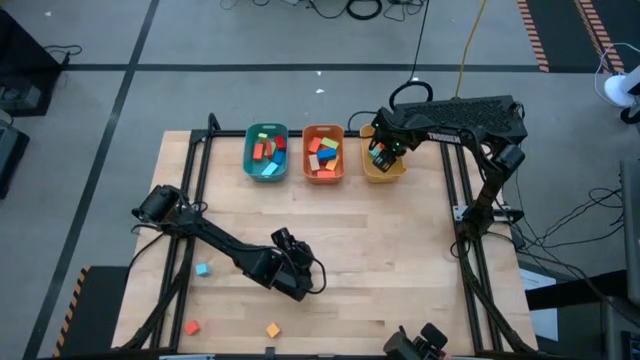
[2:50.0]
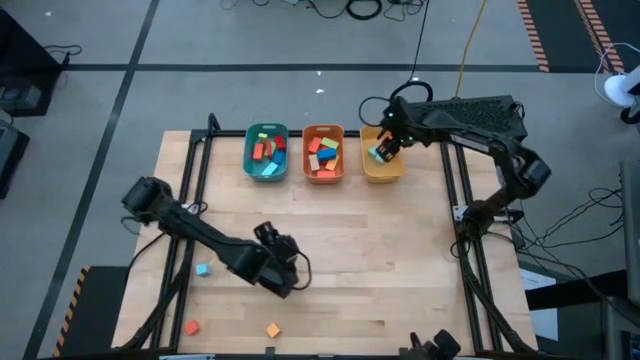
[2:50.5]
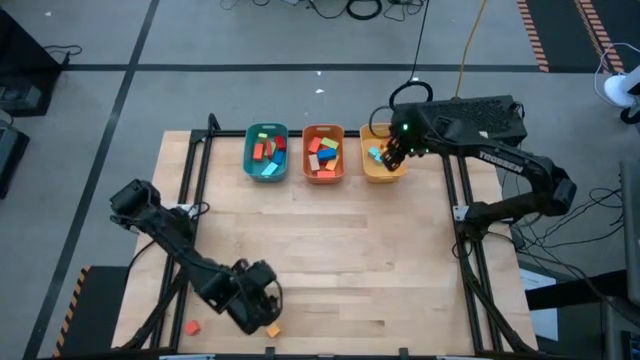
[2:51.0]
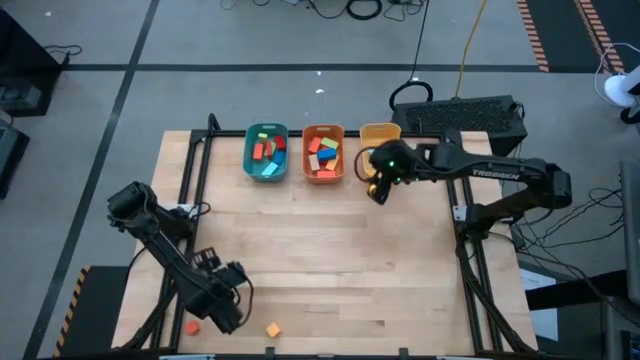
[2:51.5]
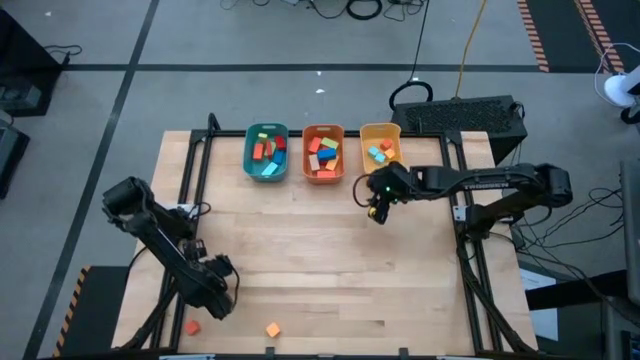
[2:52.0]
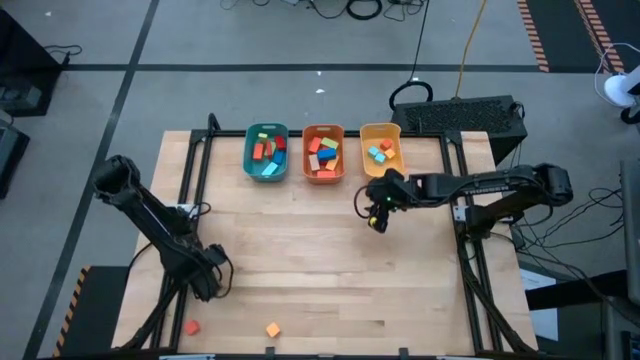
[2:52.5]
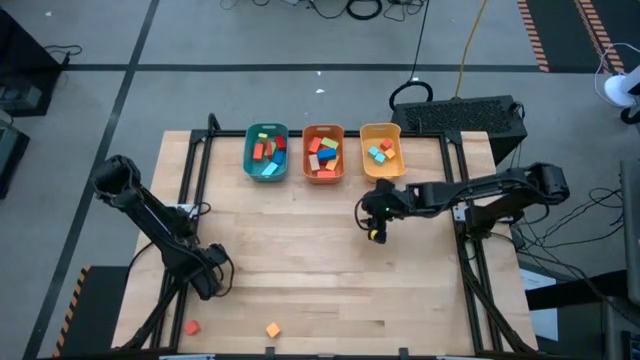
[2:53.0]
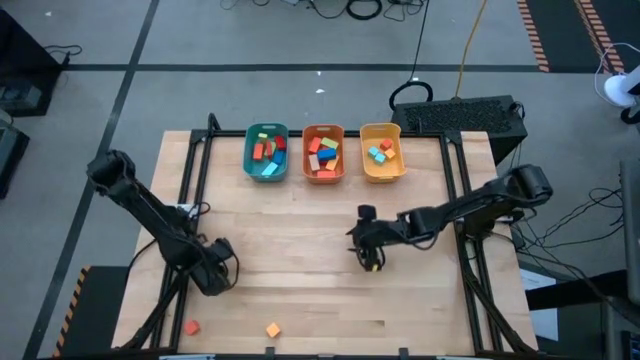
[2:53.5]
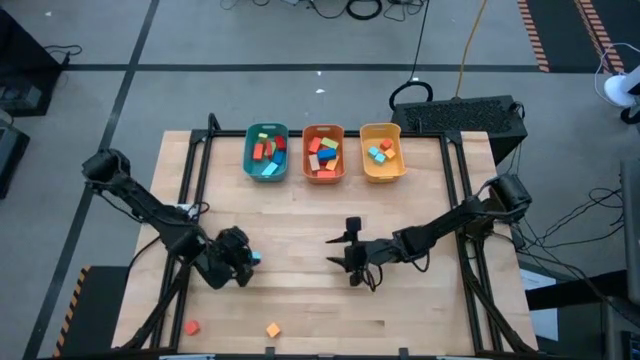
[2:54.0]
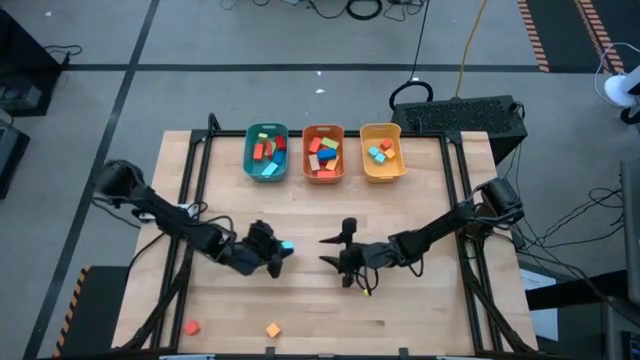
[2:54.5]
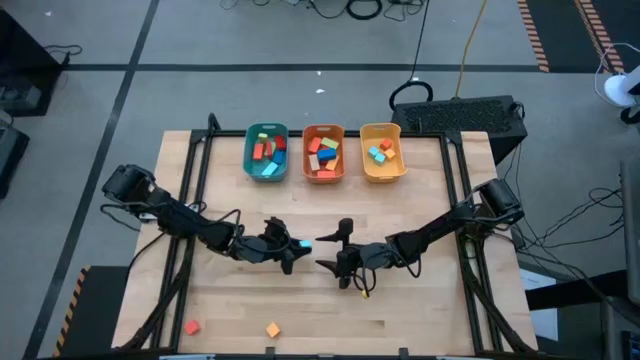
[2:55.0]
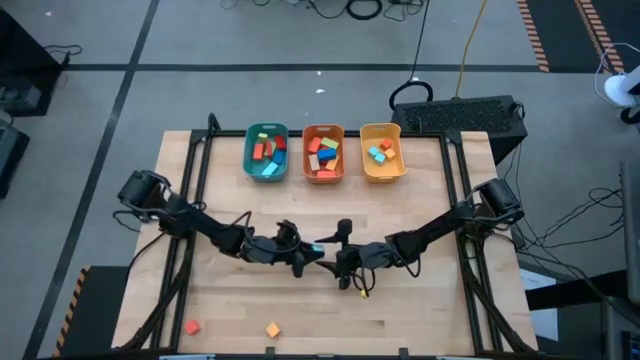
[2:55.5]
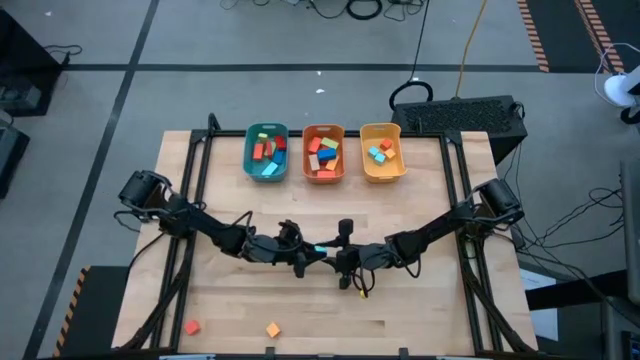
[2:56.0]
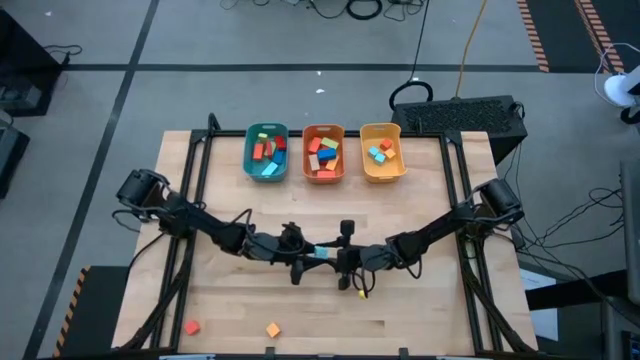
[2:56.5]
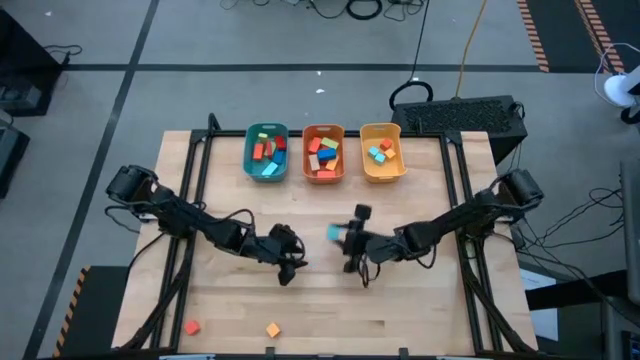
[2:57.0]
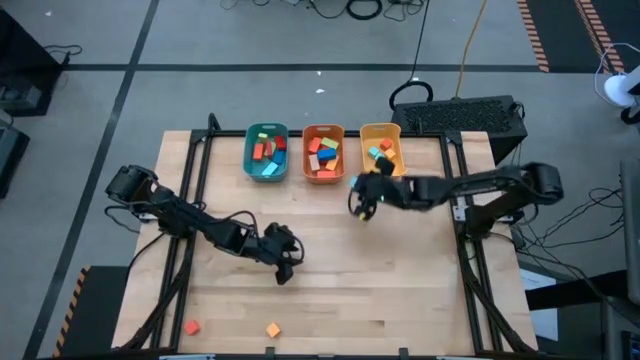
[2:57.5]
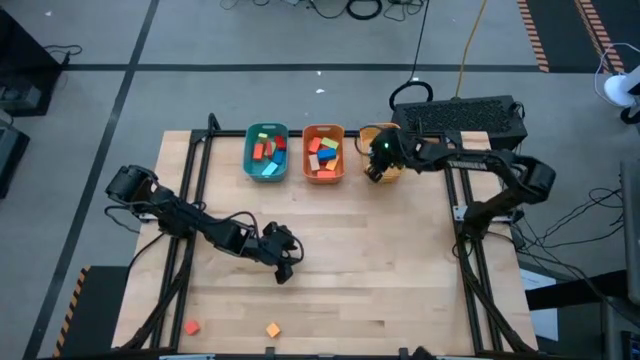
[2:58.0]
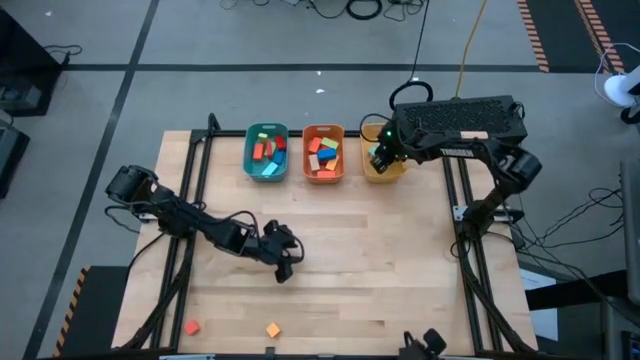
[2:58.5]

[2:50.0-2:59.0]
Task: Sort blocks by size
Put the light blue cube block into the yellow bin

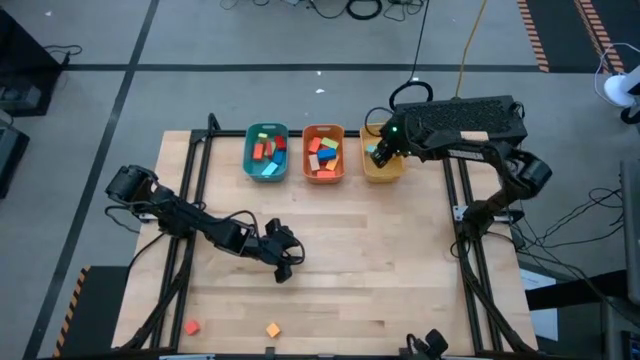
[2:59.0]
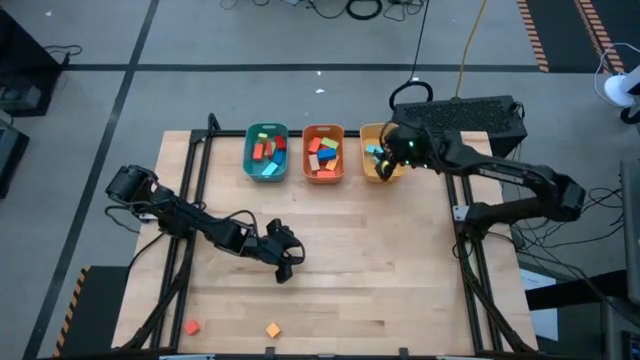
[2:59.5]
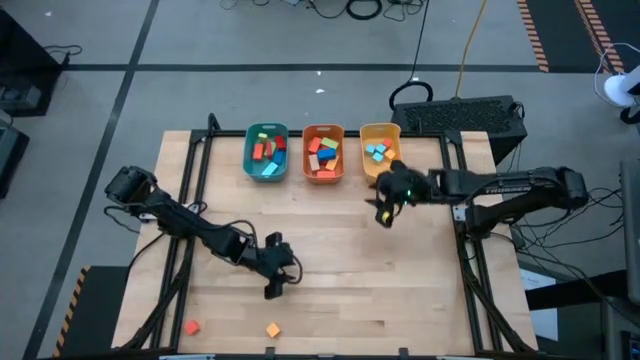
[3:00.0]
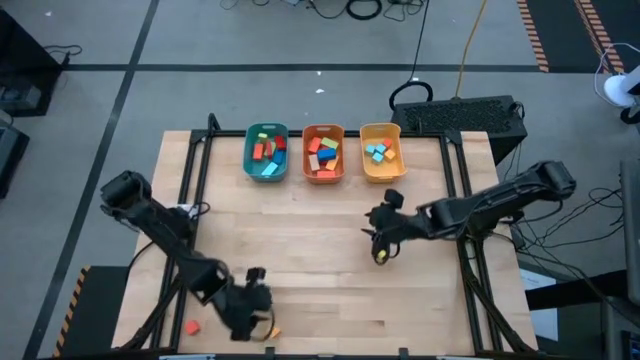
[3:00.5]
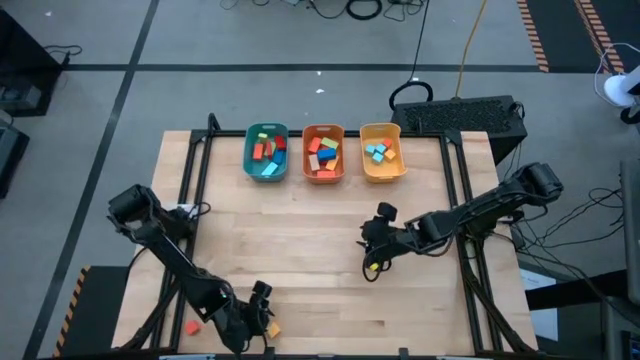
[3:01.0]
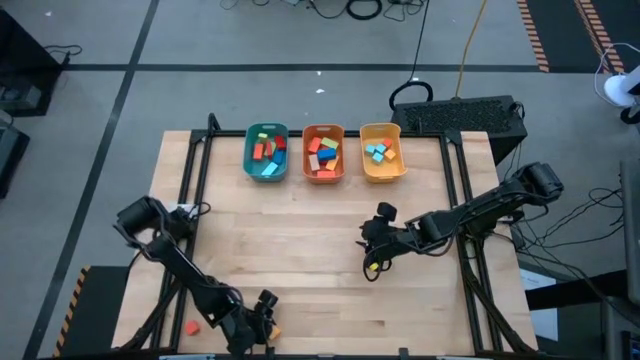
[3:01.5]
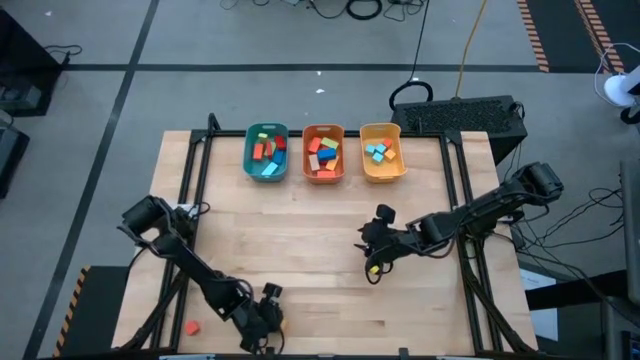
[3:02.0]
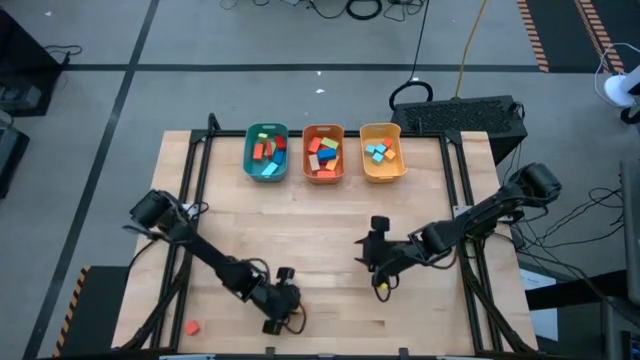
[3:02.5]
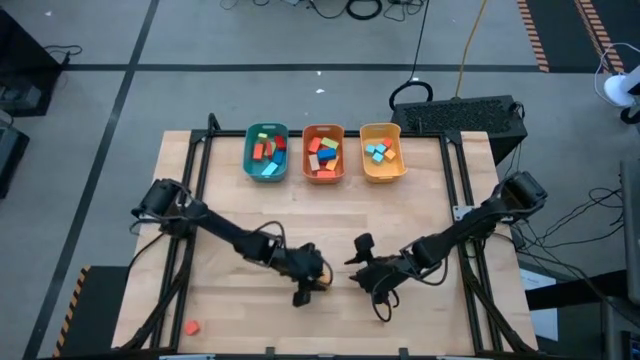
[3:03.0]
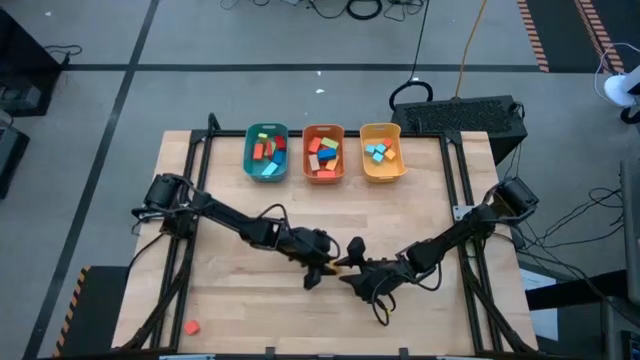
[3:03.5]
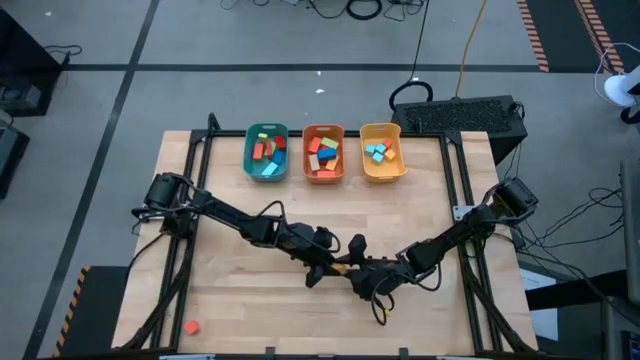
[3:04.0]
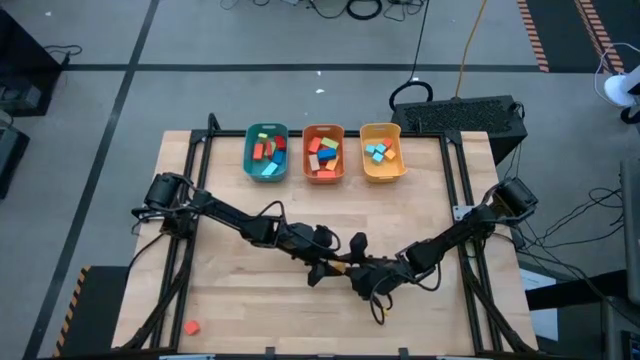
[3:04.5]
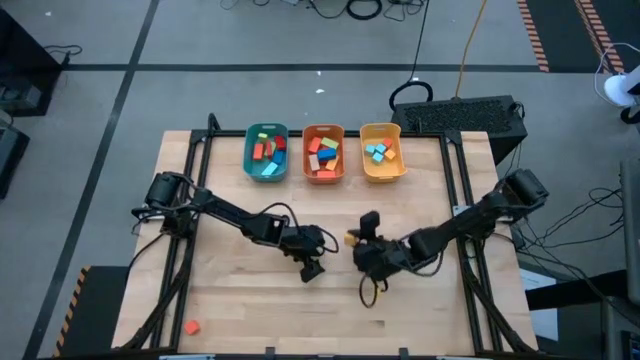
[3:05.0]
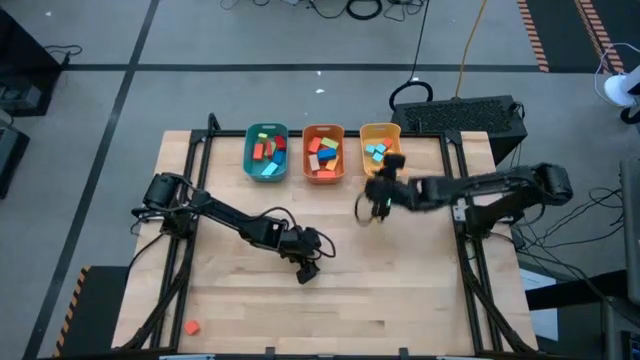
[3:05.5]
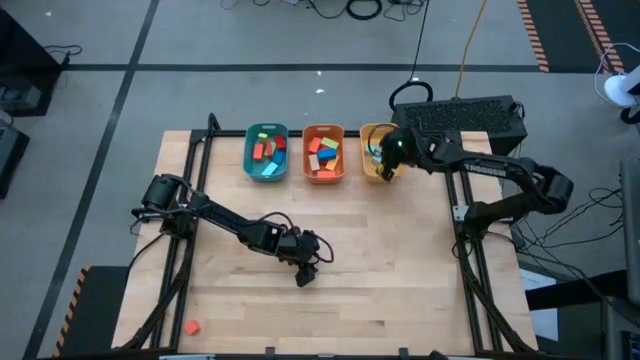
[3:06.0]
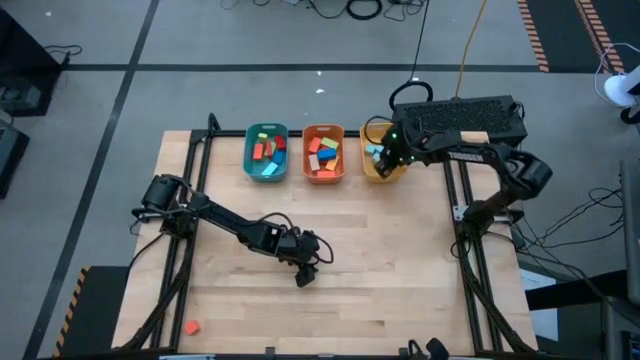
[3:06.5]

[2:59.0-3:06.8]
Put the yellow cube block into the yellow bin

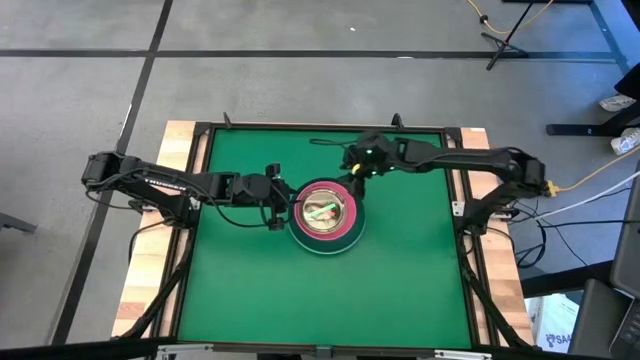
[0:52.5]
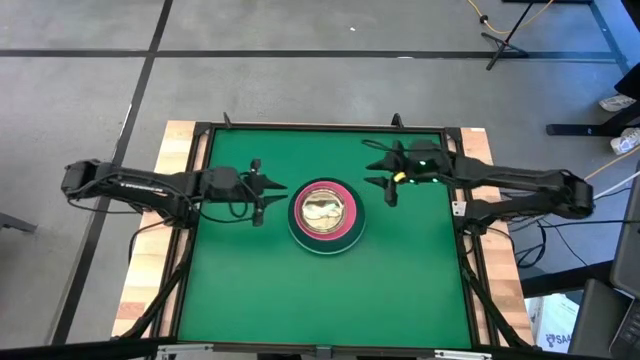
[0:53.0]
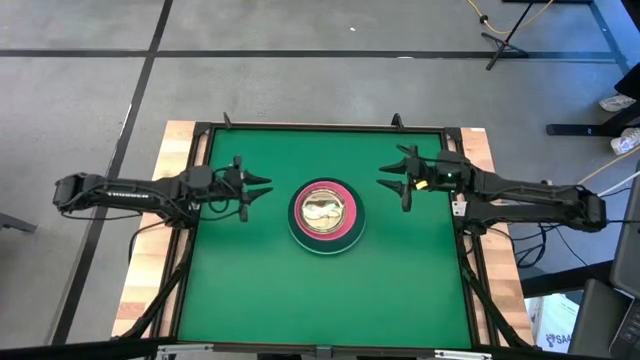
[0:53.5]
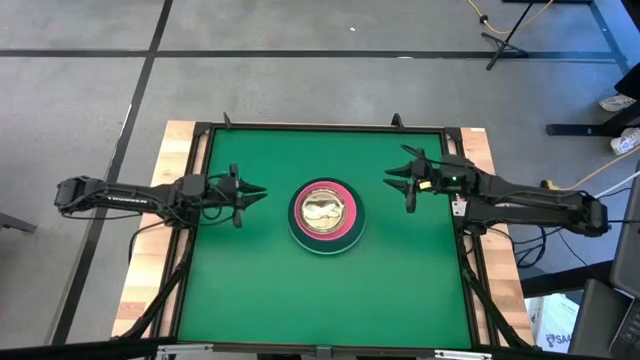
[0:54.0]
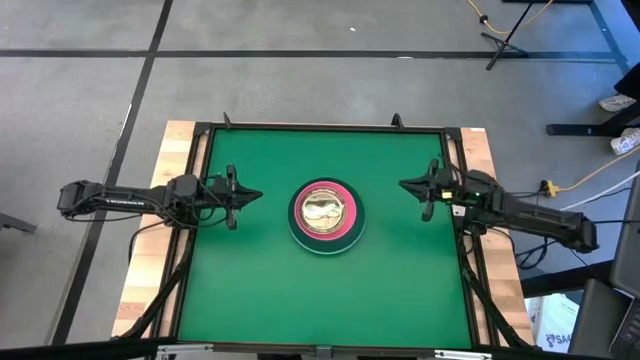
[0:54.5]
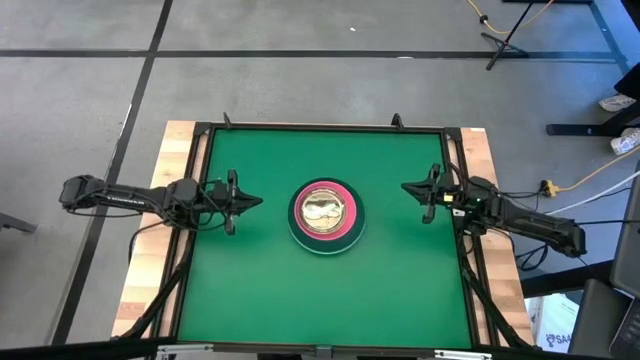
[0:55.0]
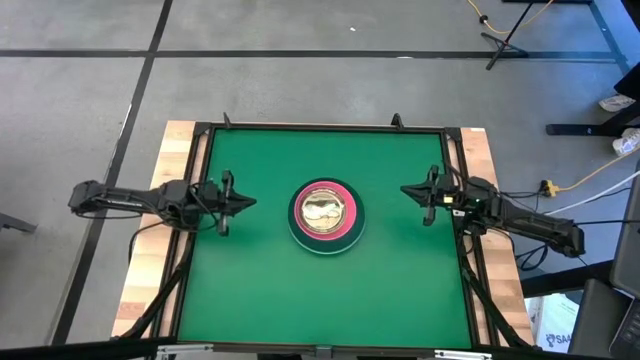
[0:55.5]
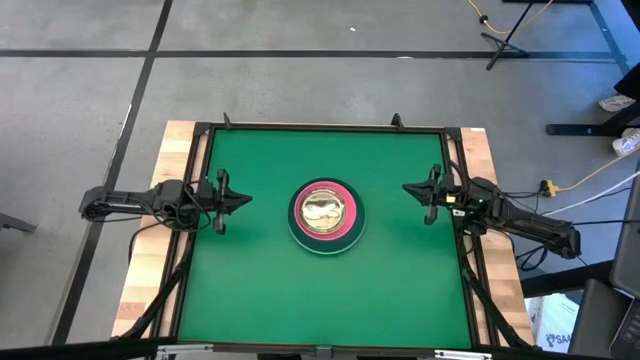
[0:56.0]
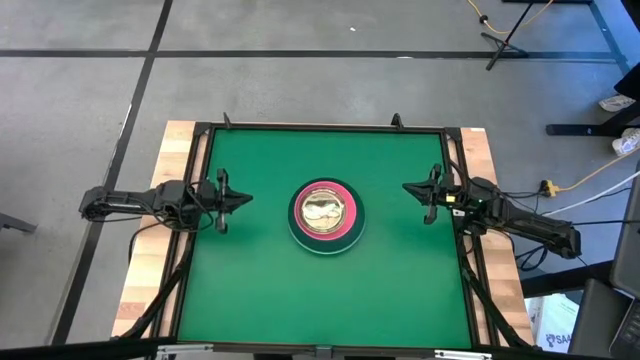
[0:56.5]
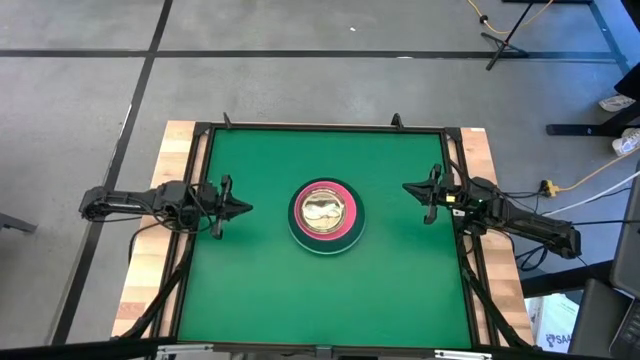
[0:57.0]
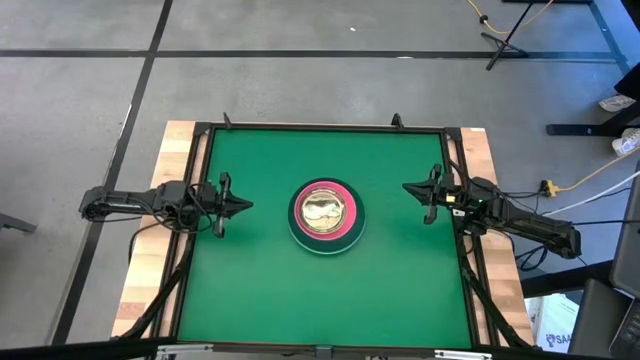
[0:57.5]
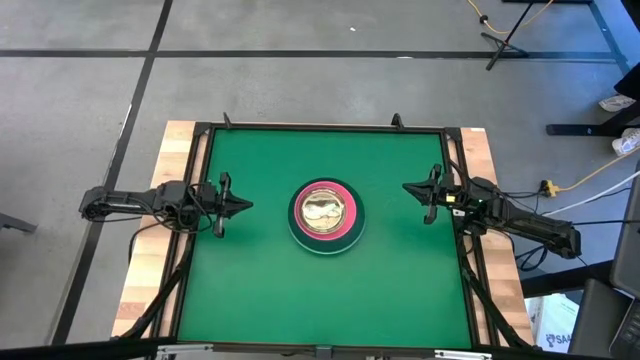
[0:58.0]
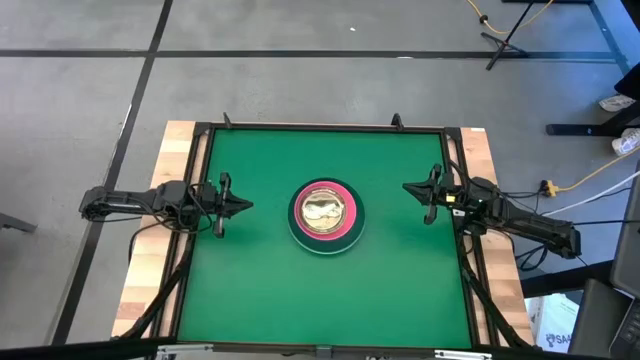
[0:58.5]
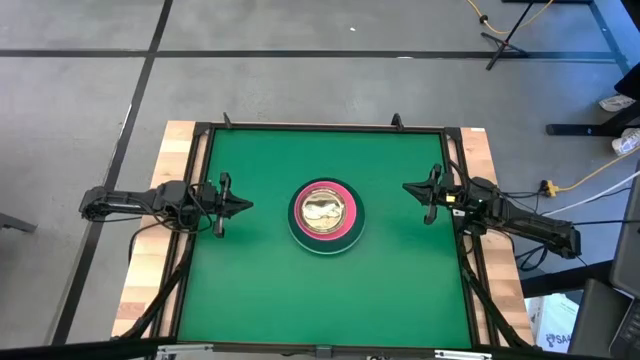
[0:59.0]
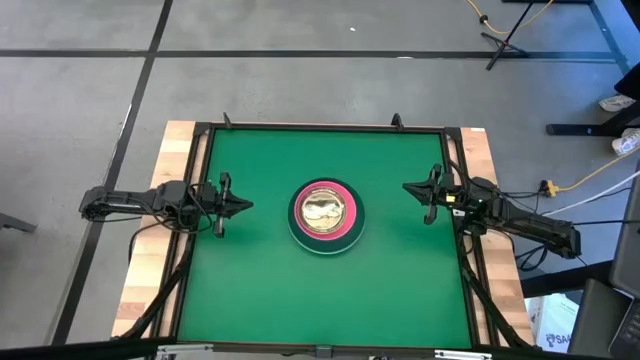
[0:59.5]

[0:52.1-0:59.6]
Task: Stack plastic plates
Return to Home Position
